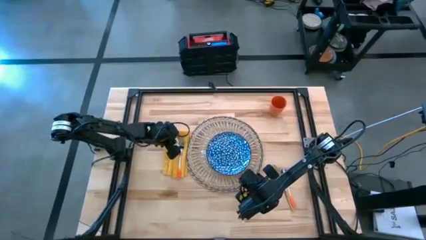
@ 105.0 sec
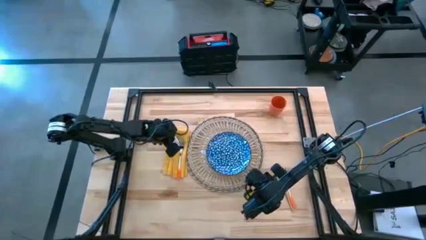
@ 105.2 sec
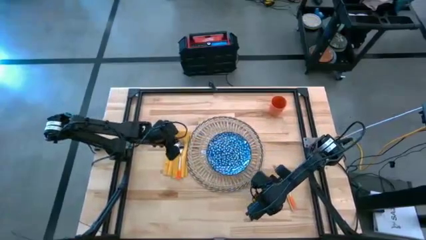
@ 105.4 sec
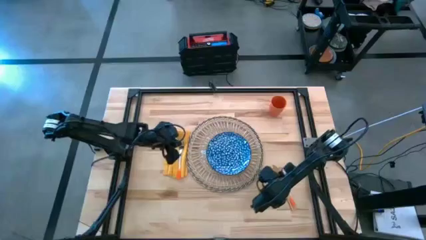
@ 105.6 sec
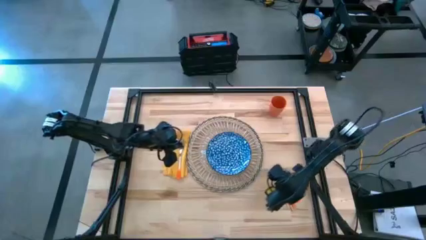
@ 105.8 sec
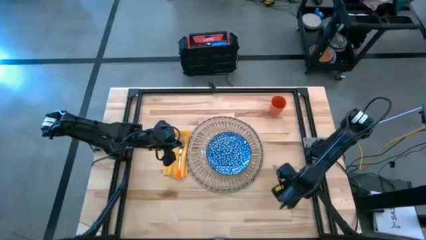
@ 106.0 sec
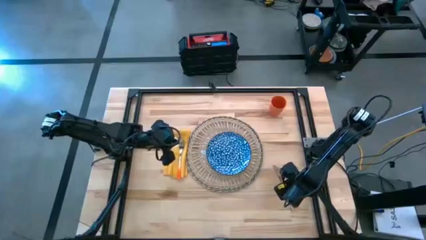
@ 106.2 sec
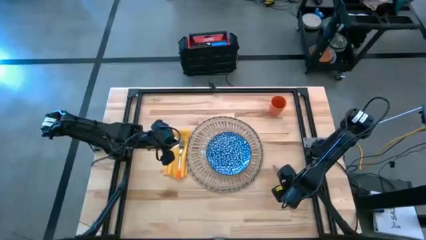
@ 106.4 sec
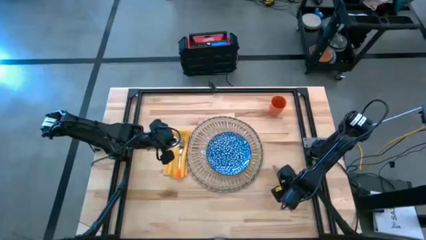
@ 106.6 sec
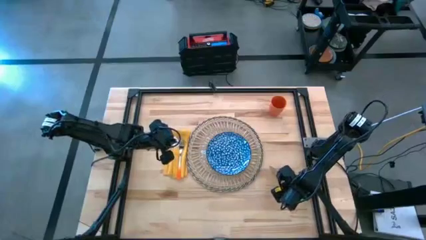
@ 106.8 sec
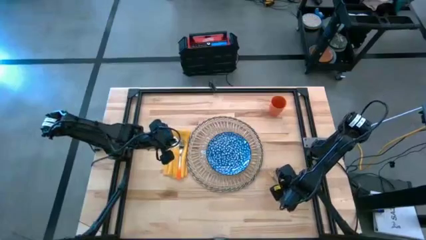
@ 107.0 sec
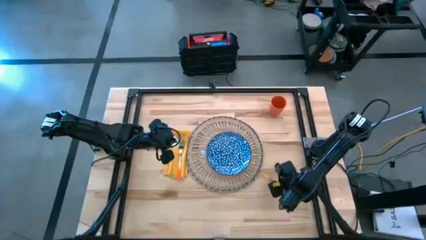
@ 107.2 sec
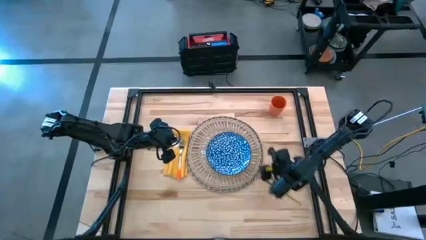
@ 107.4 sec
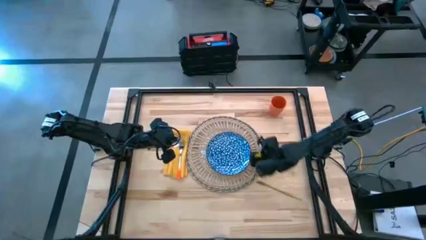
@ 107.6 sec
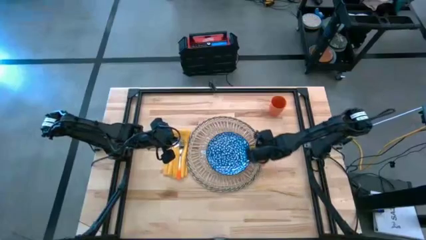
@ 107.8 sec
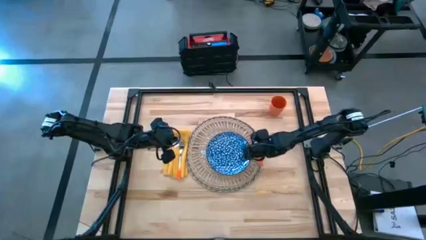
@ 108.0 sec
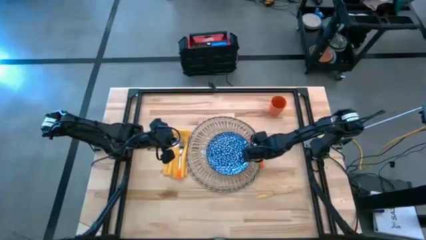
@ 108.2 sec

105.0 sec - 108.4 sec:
Task: Set table place
Put the orange spoon on the brown placemat to the right of the blue plate

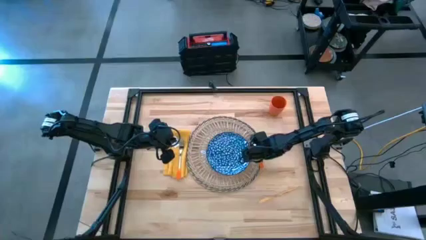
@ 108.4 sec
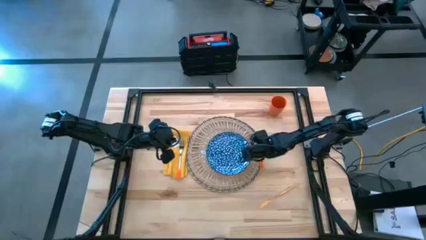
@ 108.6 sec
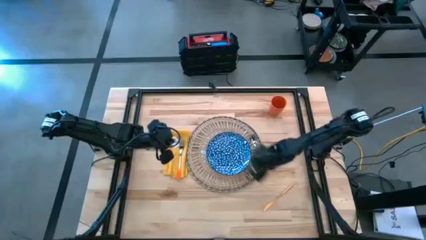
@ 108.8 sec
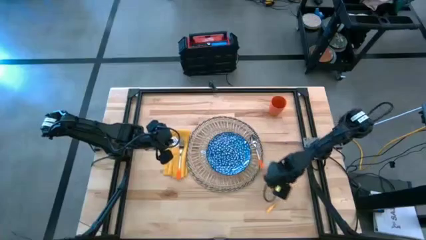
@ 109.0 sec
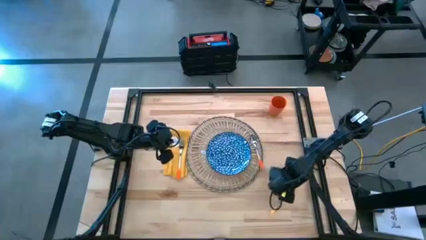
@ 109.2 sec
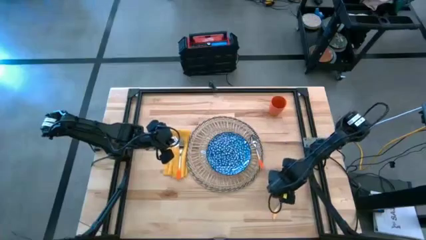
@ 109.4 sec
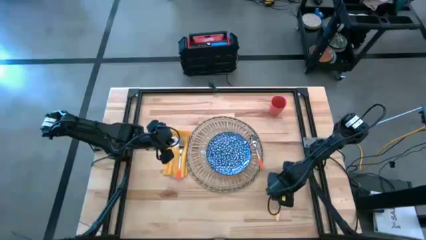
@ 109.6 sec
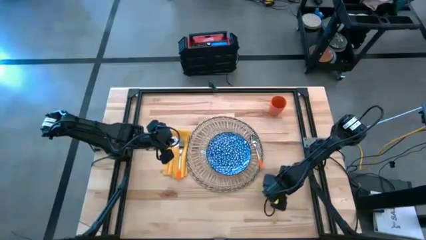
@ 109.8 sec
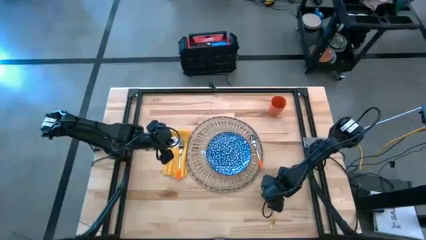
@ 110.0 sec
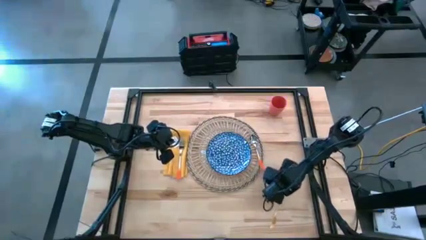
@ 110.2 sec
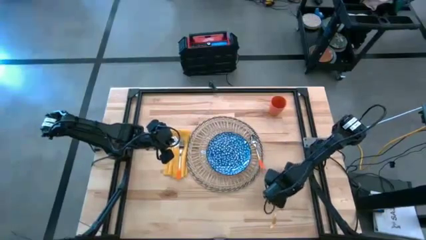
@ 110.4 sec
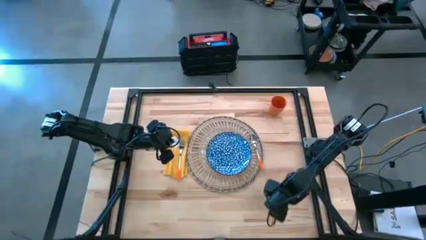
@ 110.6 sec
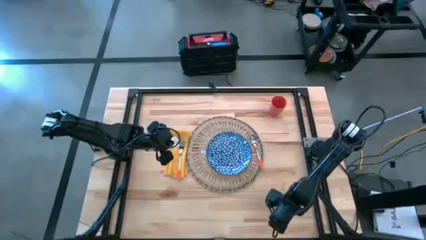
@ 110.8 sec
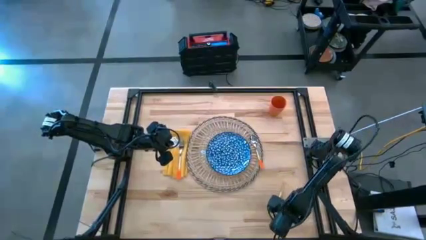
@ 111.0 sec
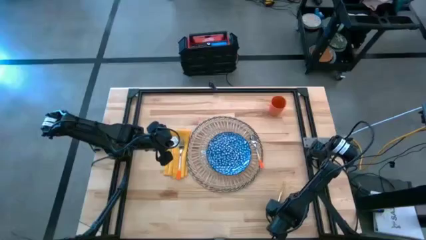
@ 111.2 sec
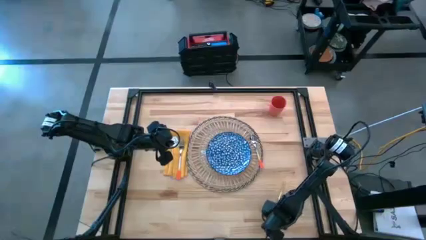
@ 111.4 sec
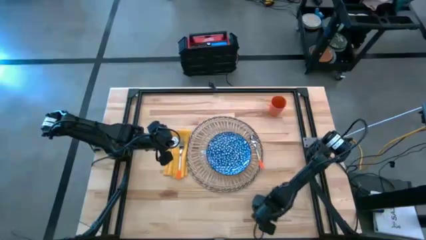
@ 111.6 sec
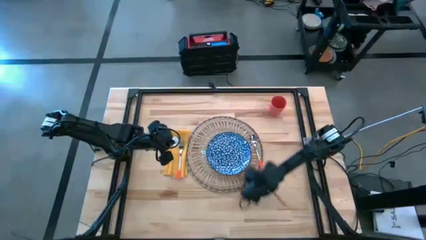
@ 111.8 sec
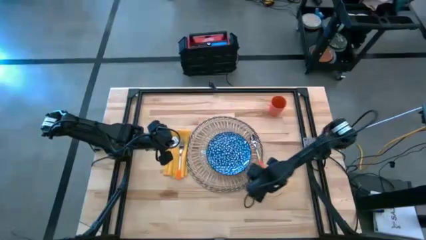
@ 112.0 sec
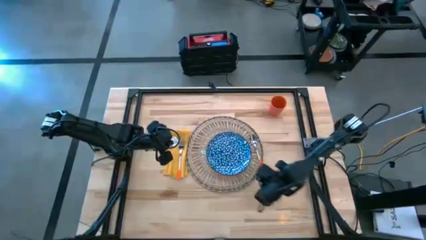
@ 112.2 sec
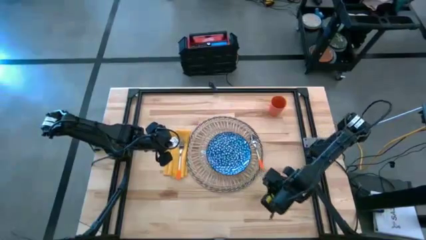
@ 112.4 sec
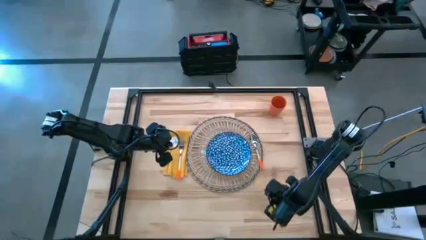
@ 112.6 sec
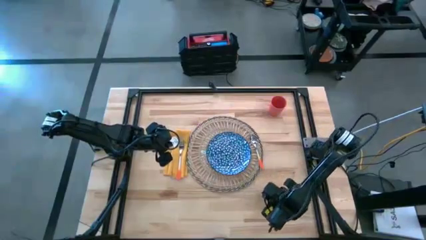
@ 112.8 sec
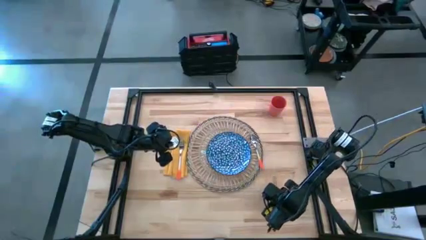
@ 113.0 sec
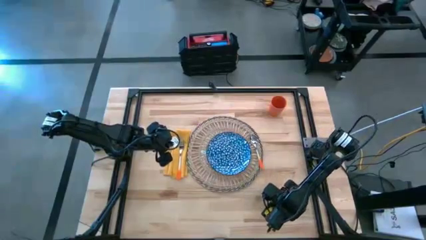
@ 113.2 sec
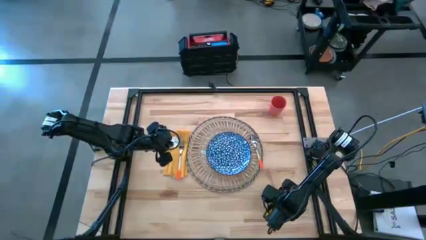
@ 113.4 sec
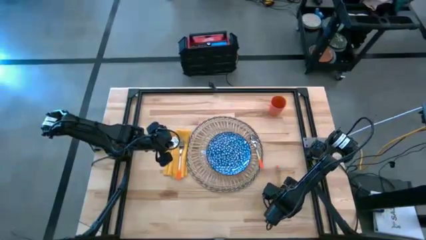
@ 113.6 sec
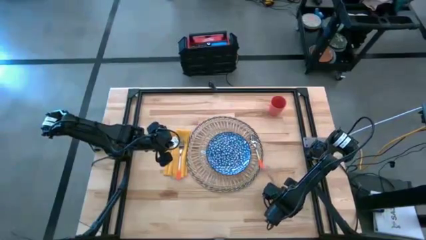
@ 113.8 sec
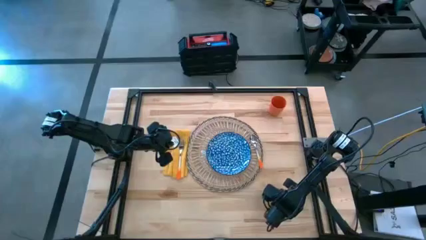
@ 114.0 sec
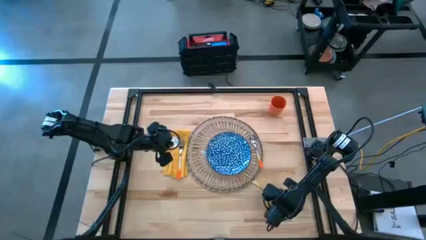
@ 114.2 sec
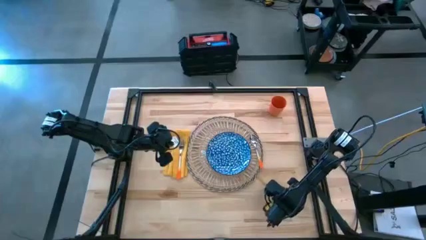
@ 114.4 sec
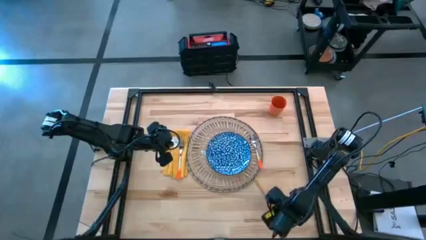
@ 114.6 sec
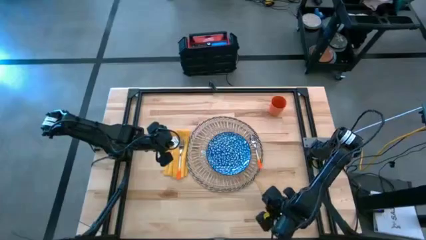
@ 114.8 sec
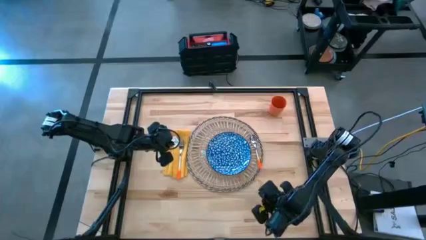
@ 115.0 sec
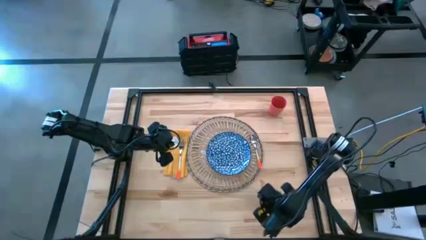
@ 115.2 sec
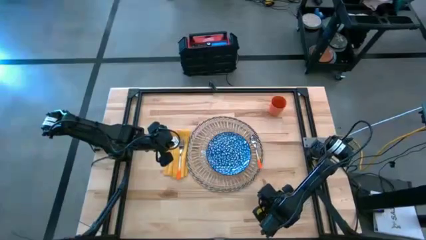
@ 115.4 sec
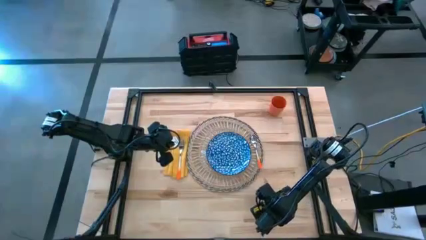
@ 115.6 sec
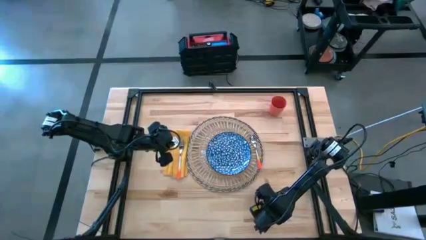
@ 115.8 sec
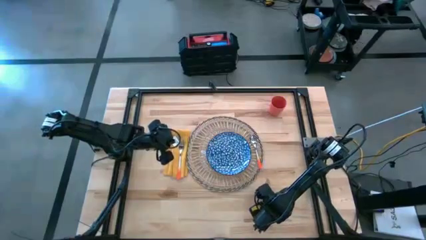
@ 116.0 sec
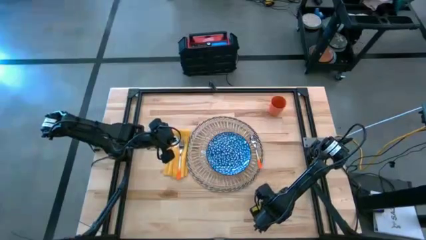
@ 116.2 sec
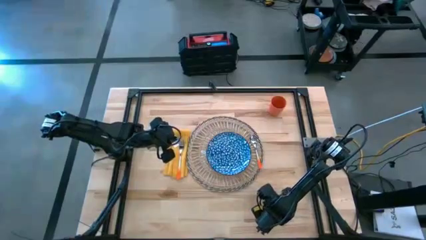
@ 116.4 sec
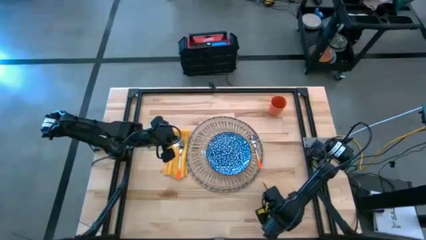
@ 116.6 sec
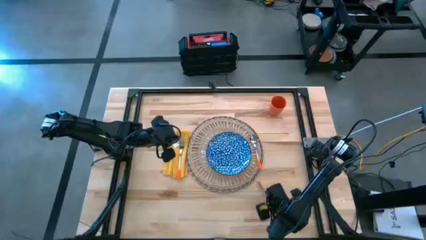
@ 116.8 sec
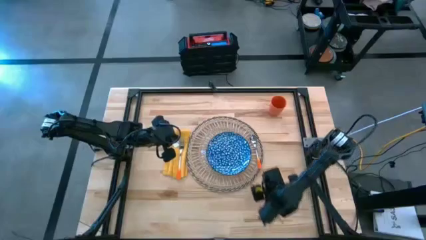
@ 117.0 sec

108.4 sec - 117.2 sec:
Put the orange knife on the brown placemat to the right of the blue plate

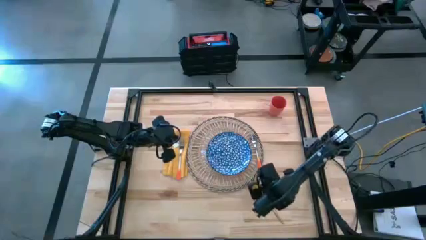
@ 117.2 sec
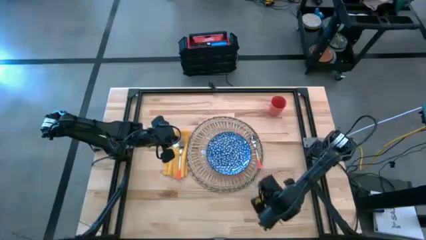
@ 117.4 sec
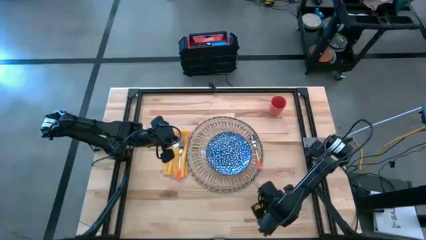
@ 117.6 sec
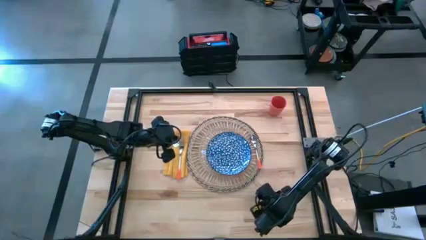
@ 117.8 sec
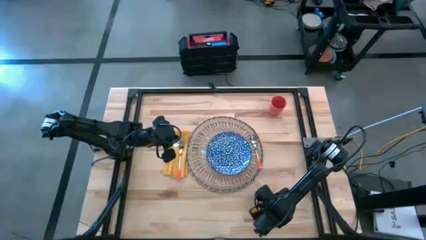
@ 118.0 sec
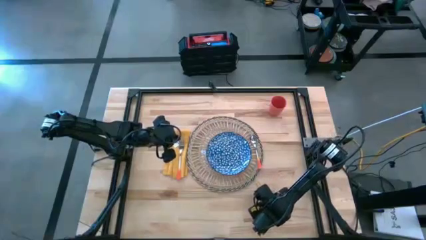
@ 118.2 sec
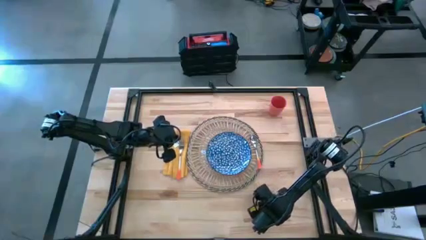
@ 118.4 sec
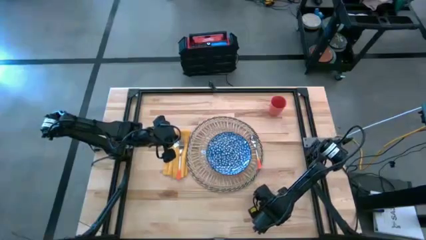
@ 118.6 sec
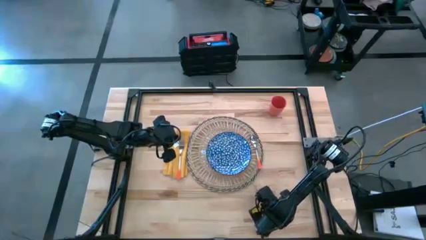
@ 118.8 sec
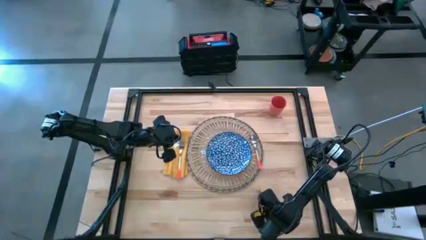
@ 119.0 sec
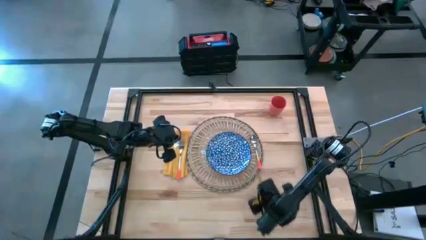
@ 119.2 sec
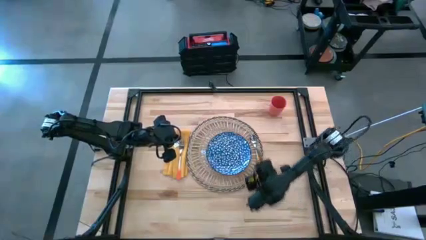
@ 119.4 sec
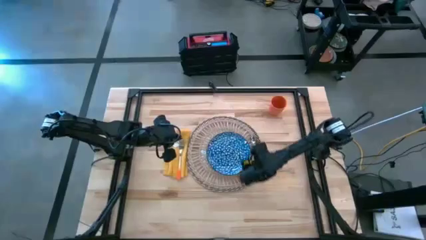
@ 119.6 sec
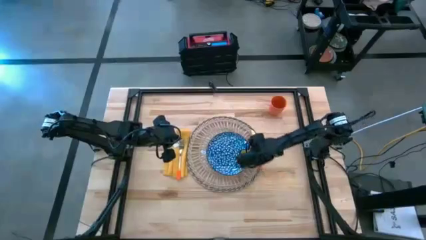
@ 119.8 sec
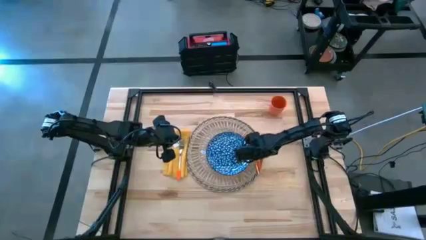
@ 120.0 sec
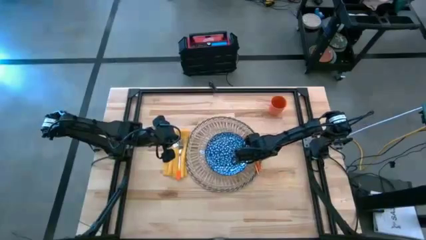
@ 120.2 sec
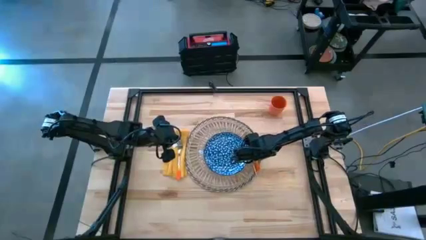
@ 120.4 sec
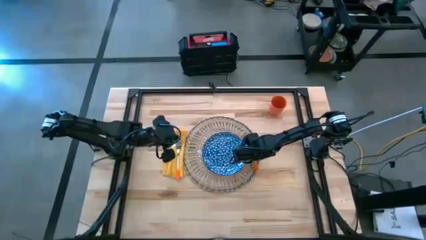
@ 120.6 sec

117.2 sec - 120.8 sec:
Put the orange knife on the brown placemat to the right of the blue plate

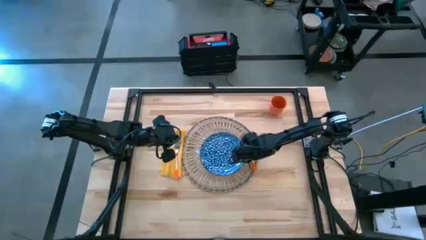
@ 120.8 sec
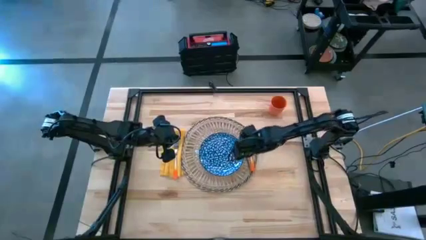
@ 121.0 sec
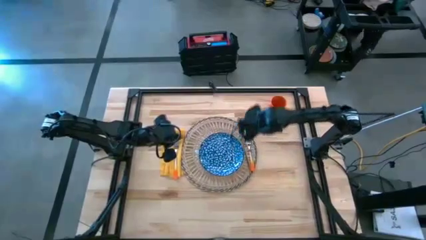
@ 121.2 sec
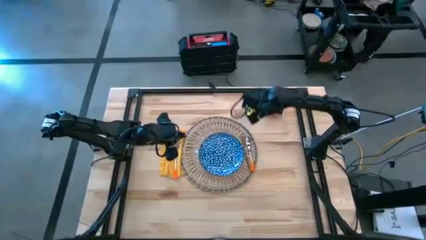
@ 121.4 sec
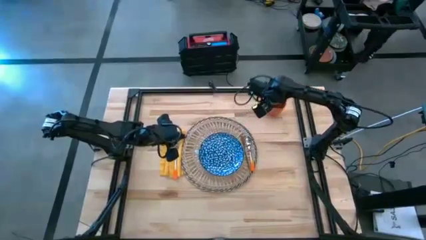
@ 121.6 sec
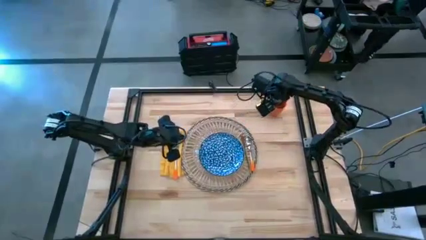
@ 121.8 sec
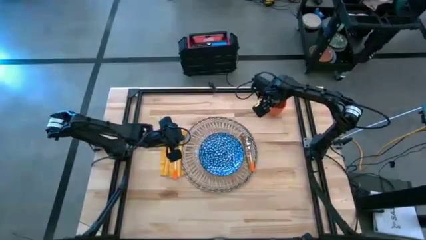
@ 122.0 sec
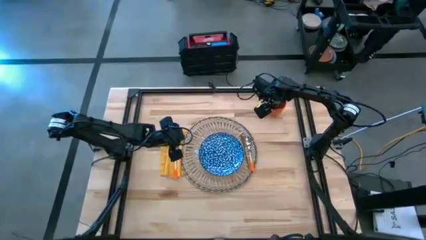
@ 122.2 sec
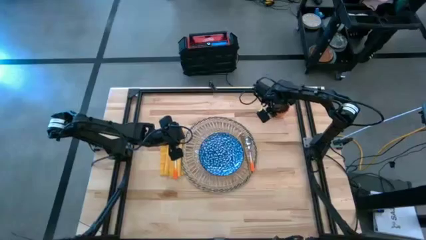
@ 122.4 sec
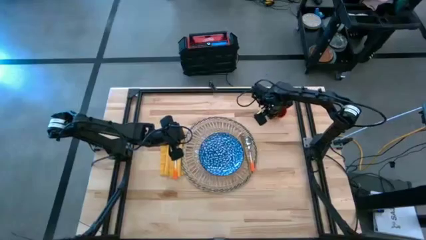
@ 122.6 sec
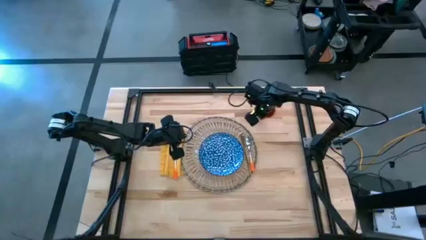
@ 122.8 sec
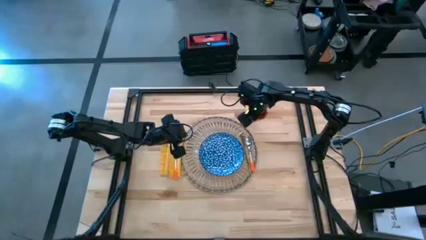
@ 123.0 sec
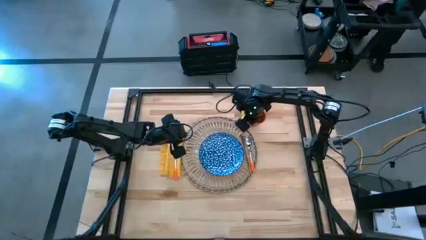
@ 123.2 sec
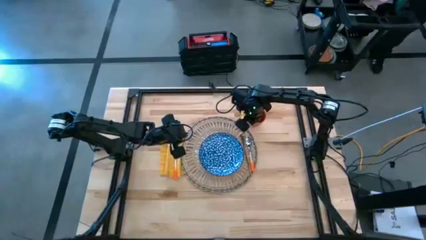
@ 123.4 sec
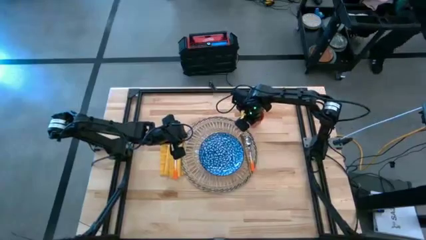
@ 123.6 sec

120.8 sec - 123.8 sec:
Move the orange cup to the top right of the table above the brown placemat
